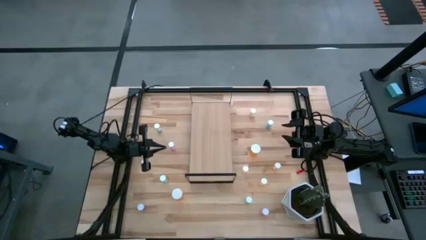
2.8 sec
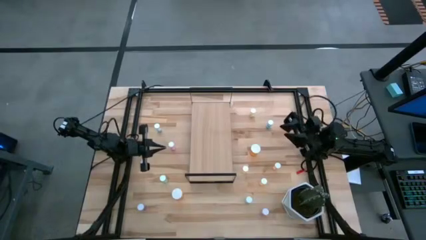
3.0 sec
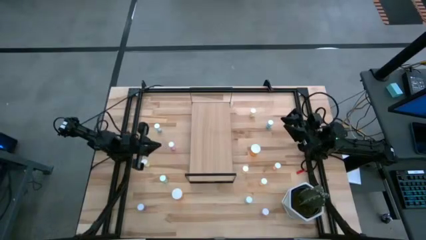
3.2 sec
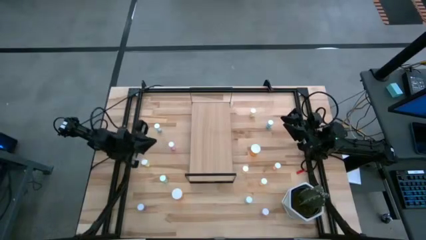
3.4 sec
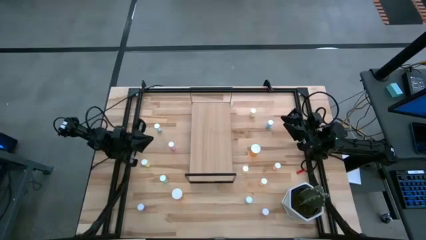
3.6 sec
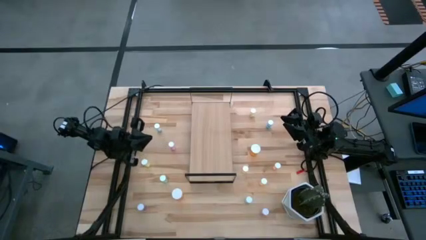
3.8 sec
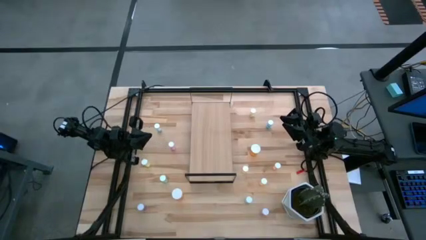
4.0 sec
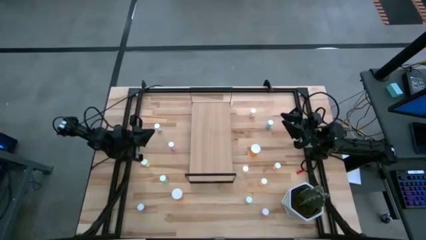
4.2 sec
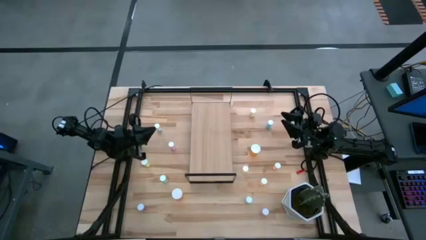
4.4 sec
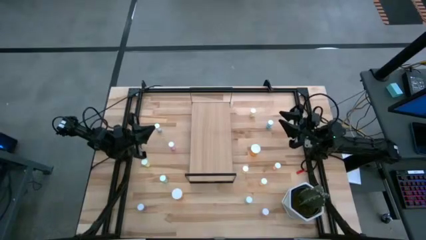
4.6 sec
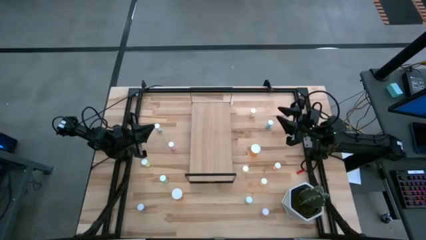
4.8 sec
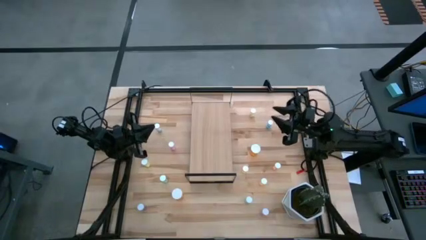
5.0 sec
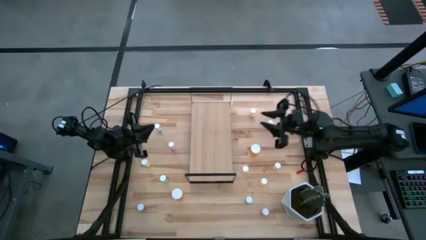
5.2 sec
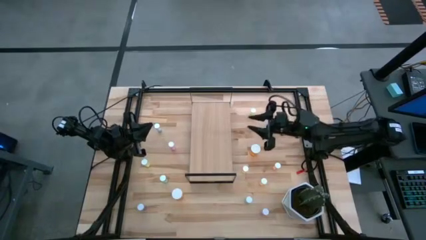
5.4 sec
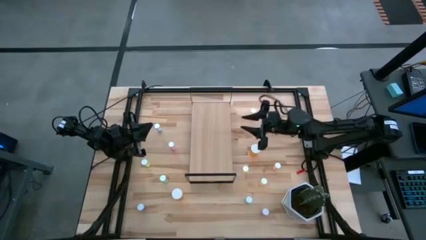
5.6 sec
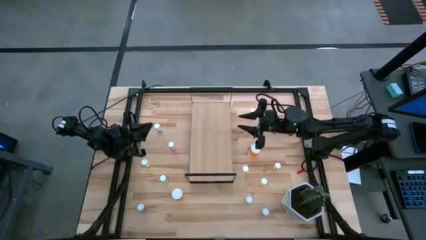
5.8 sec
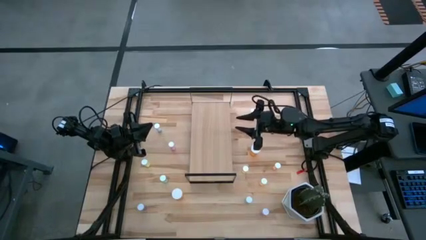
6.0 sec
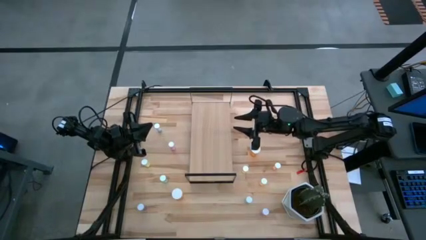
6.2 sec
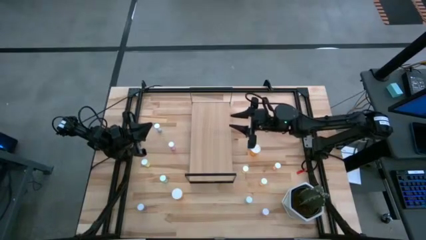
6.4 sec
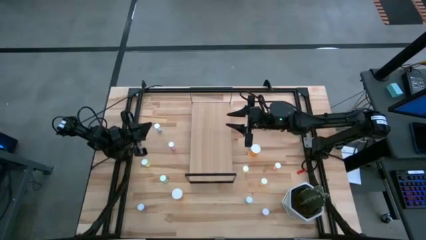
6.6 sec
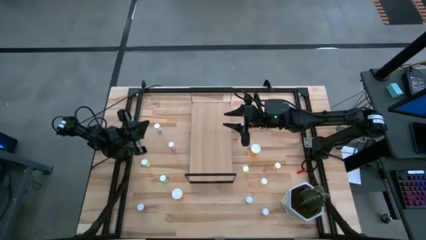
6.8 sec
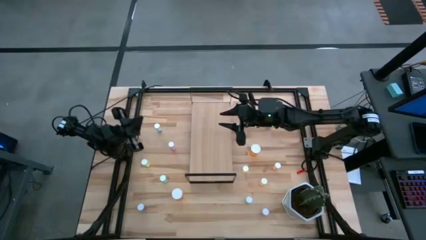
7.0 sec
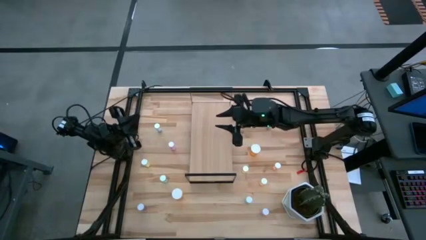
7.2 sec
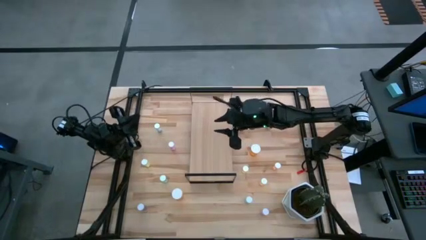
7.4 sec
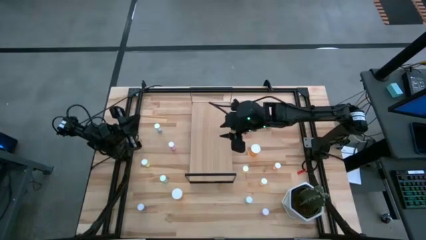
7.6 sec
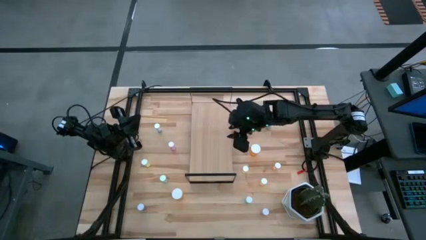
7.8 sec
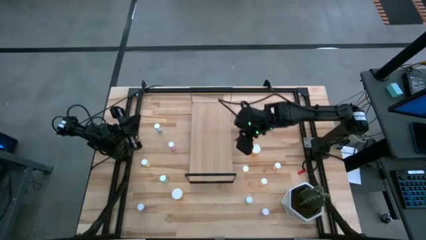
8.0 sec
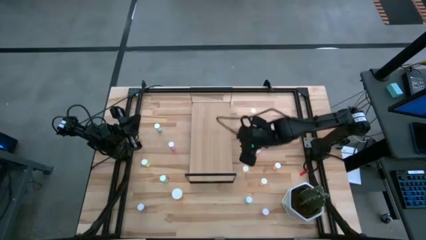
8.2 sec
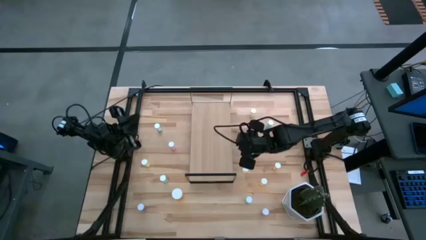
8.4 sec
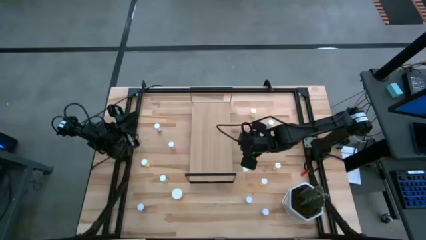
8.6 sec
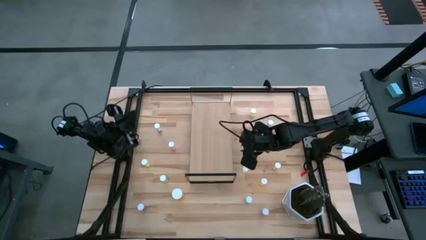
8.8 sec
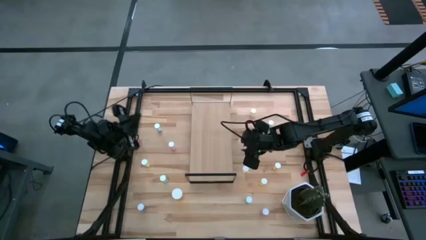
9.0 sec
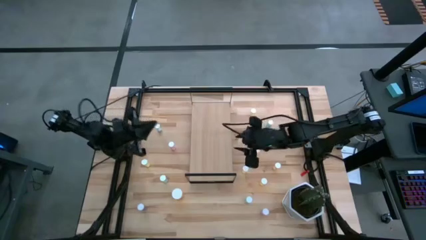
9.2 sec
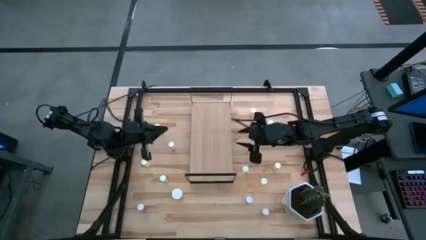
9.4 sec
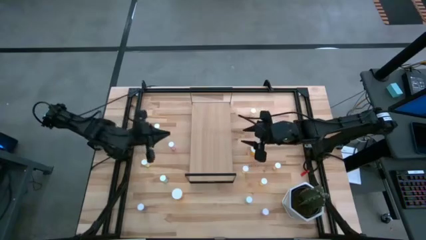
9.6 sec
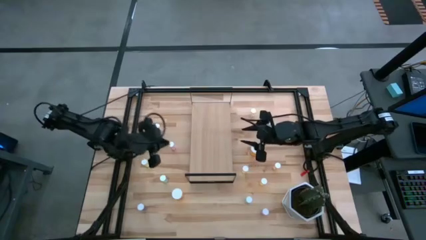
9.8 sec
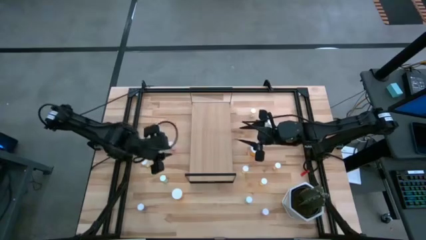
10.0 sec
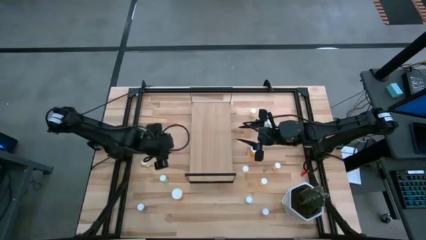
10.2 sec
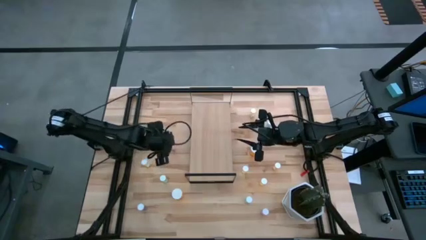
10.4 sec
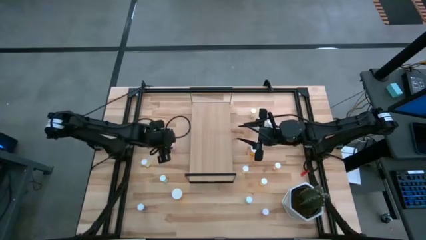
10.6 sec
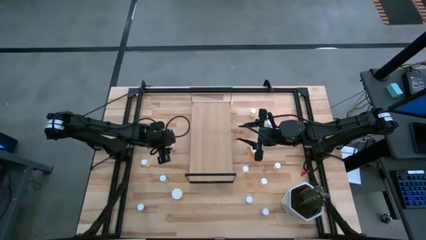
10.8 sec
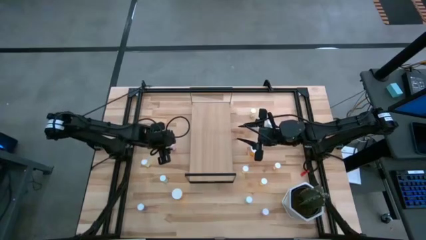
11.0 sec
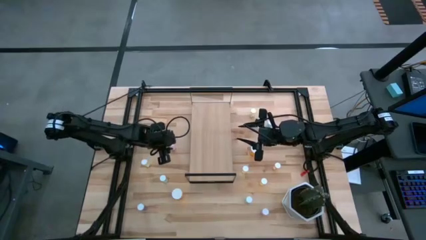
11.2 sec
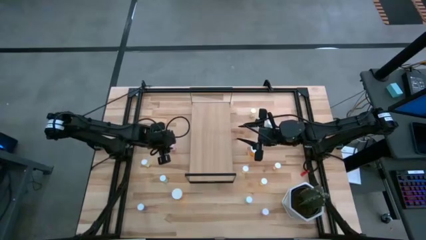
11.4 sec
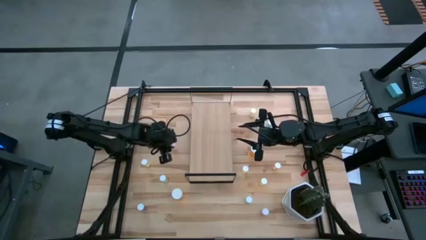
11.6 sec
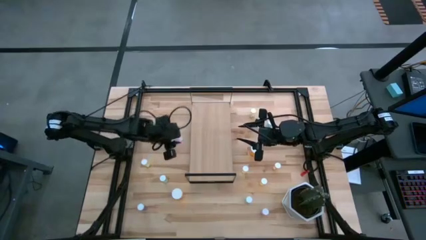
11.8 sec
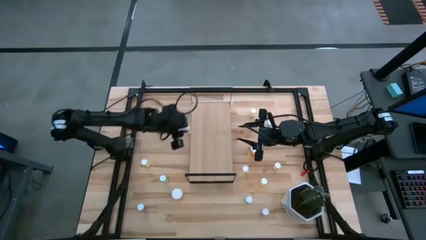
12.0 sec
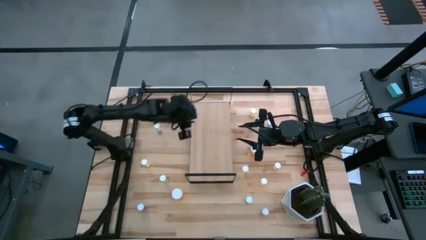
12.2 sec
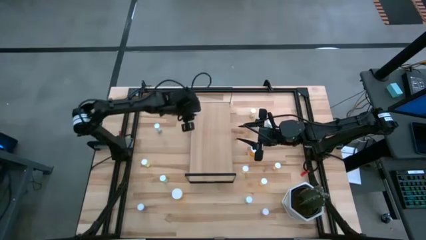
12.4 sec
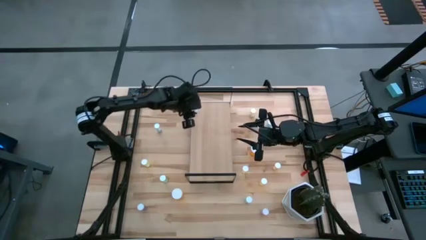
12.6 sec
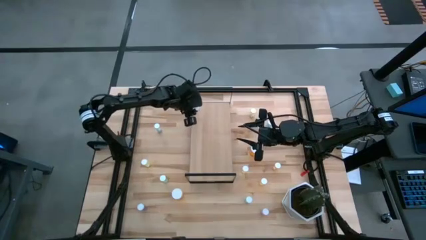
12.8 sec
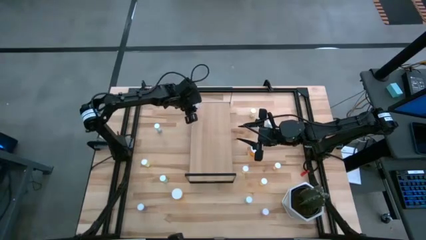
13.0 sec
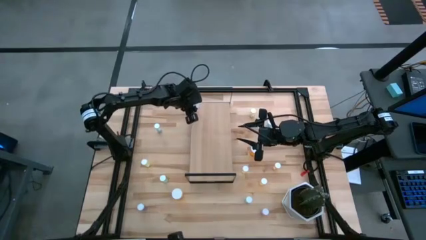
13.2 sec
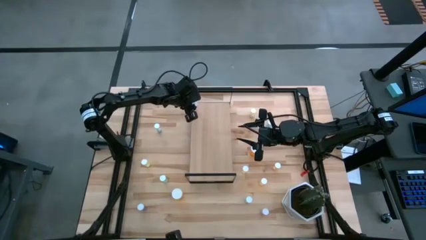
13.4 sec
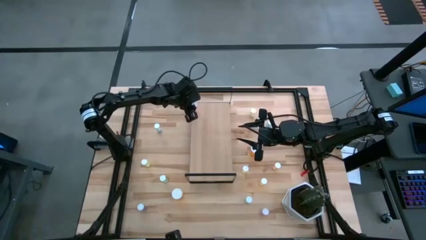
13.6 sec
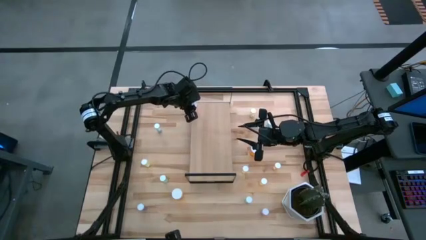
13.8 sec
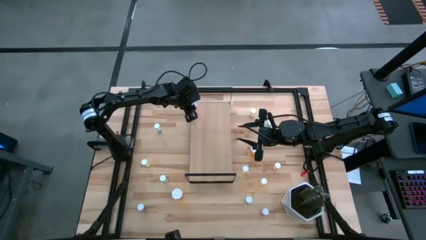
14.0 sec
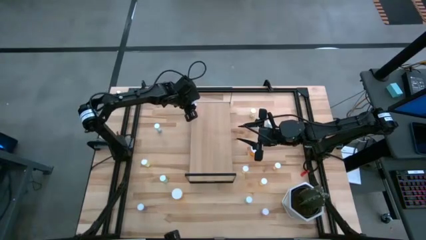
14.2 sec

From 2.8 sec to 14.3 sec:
Task: Pick and place medicine bottles onto shelf by color
Put the pink pill bottle on the shelf

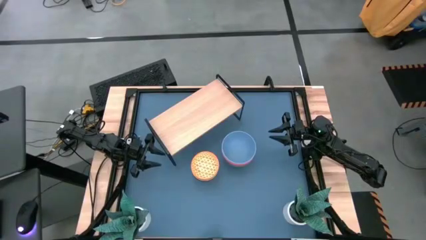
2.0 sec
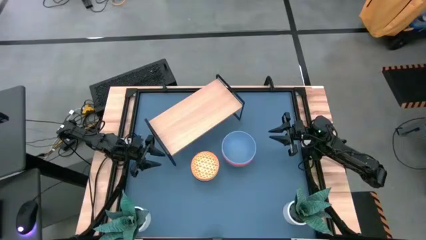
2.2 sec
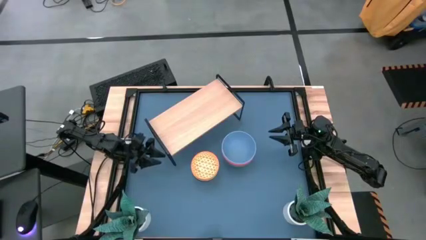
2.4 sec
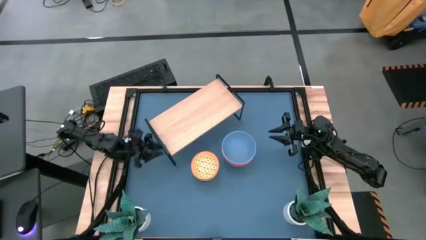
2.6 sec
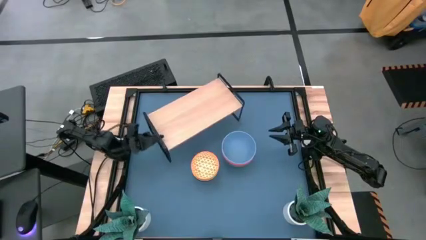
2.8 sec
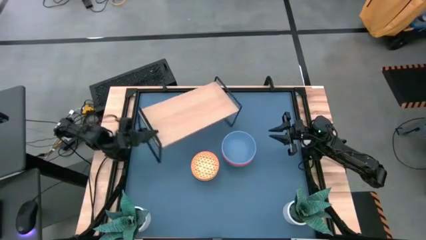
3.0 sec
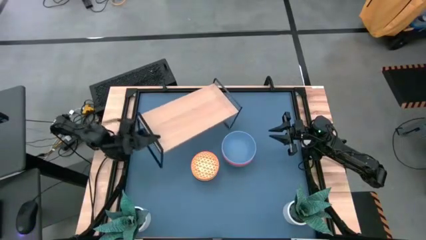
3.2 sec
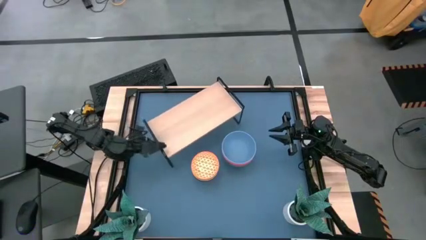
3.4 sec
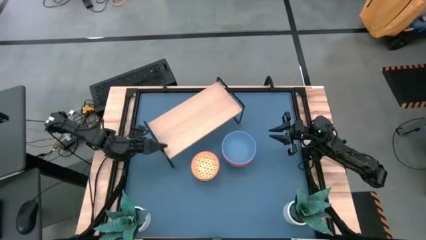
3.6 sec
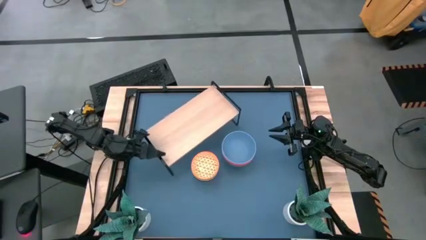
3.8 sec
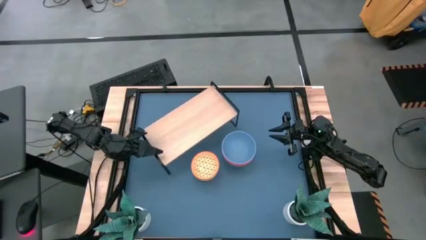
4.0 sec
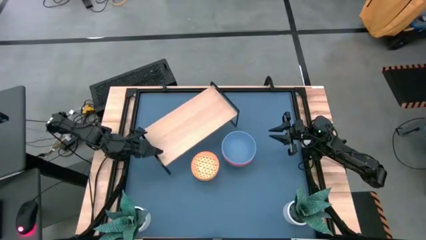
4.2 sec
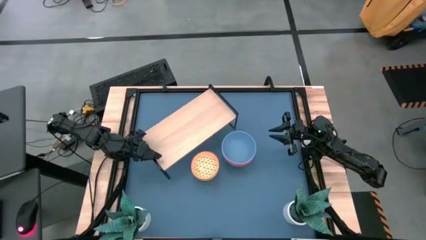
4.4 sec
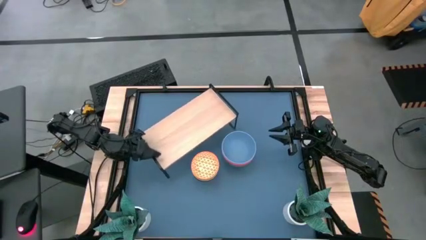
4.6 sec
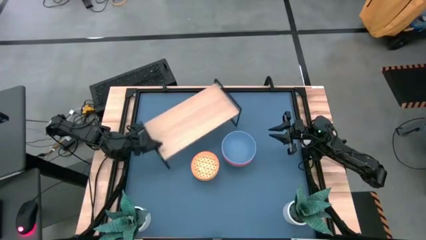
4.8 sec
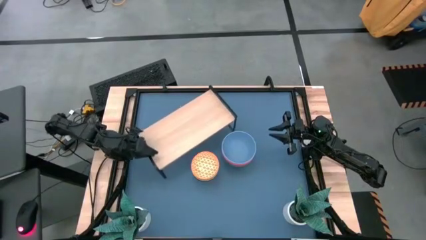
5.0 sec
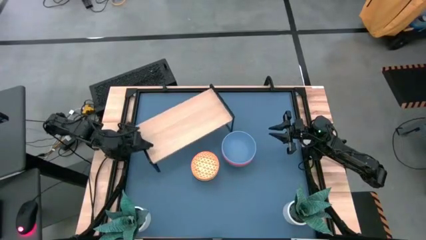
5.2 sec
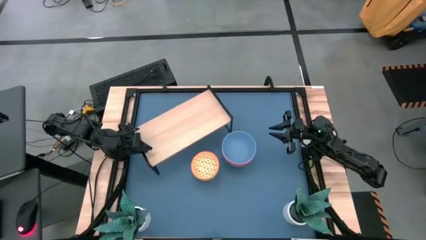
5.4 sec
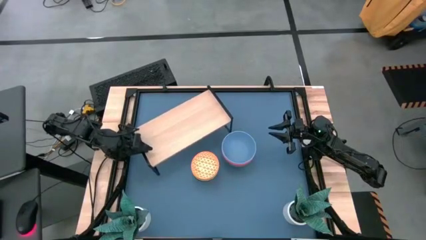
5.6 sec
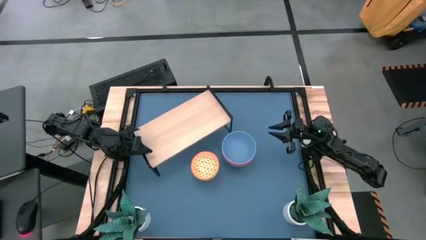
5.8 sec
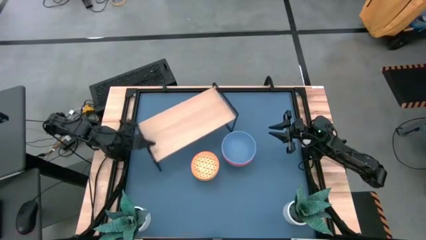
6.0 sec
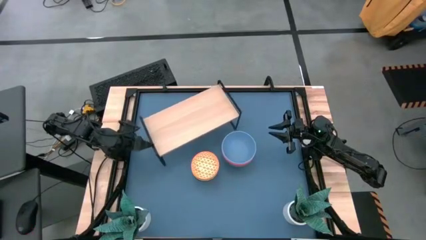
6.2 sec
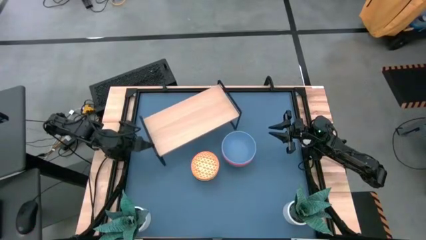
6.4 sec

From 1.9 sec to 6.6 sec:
Task: Place and stack bowls onto a shelf
Prepare the shelf
